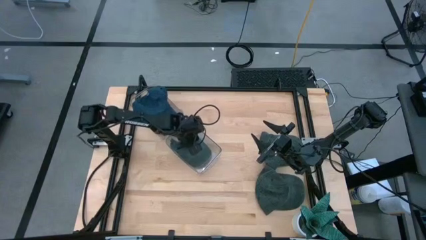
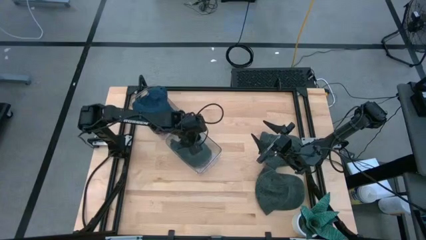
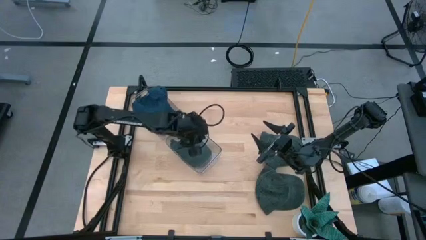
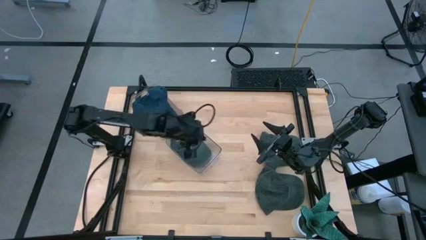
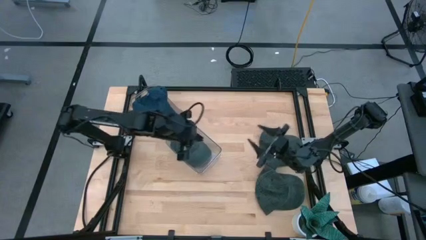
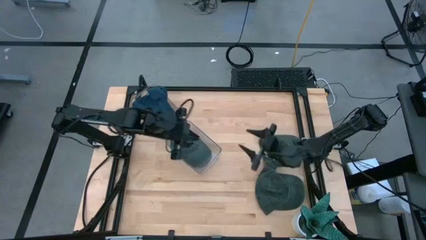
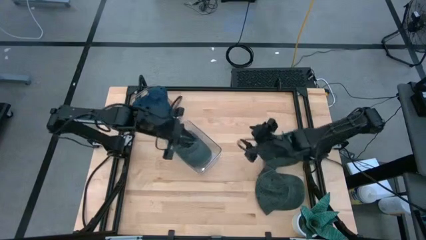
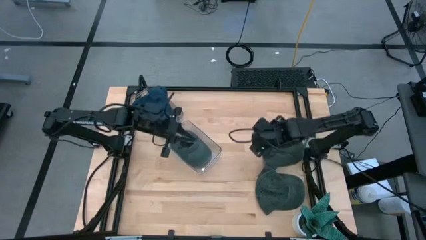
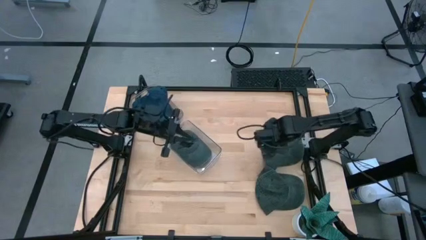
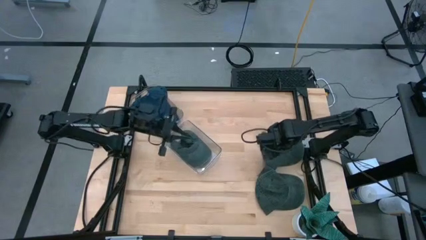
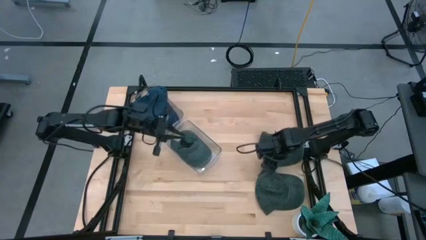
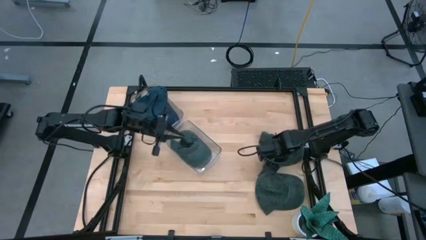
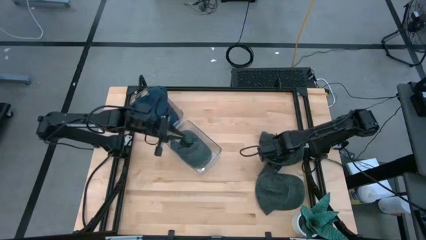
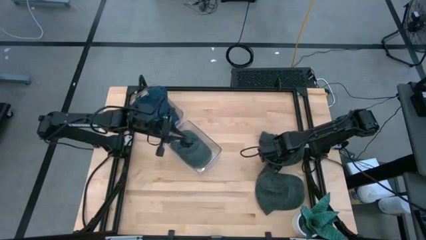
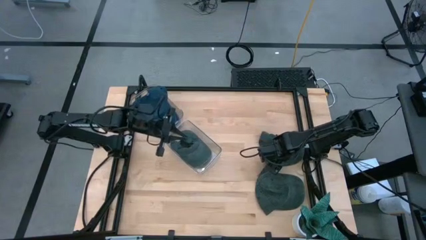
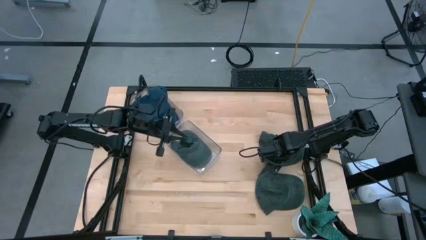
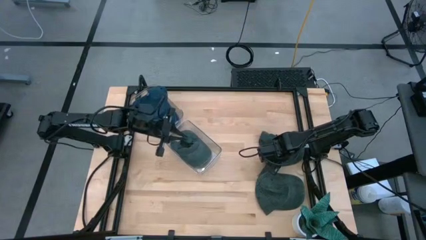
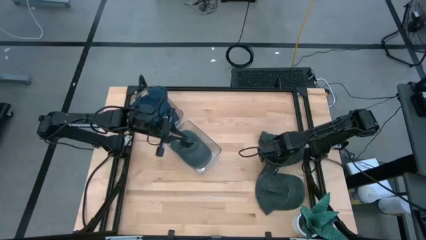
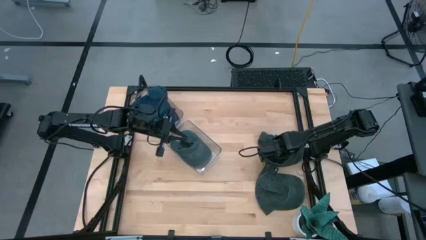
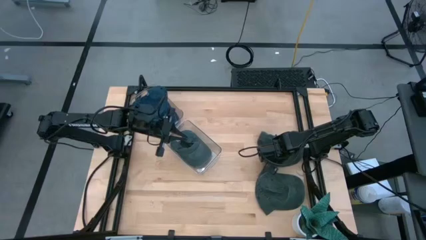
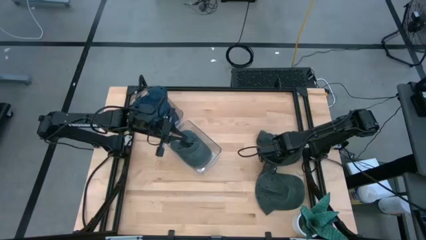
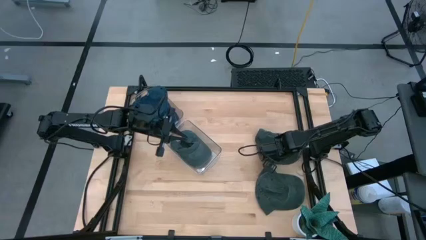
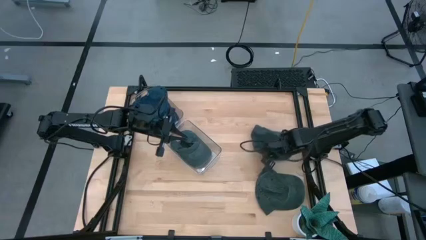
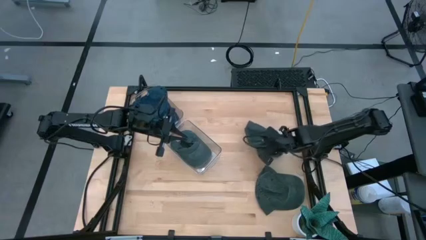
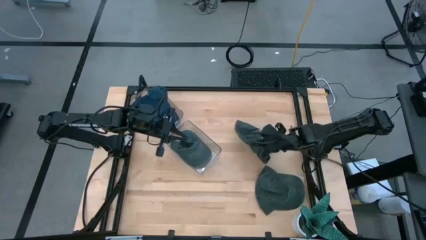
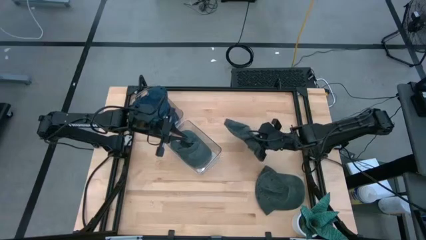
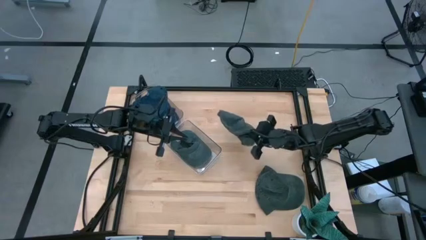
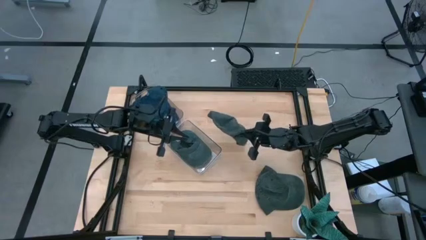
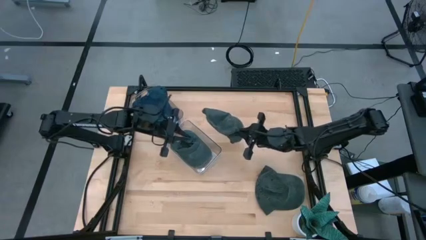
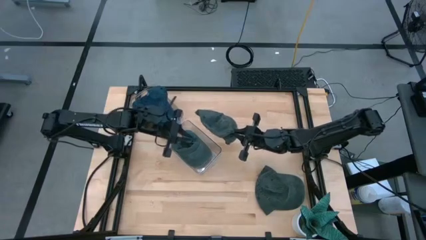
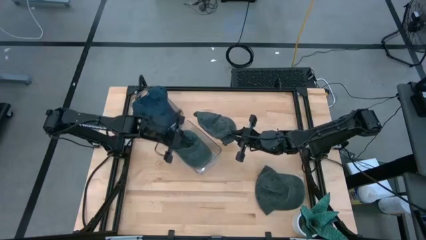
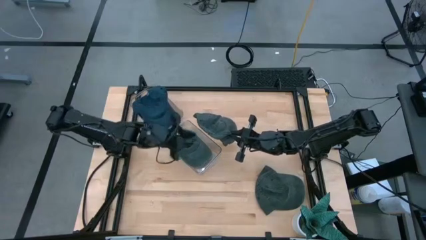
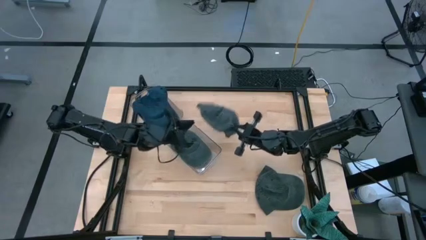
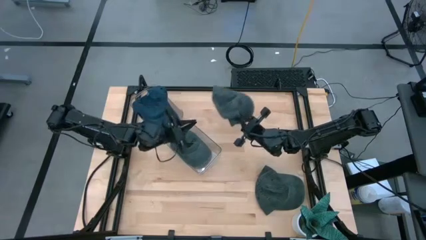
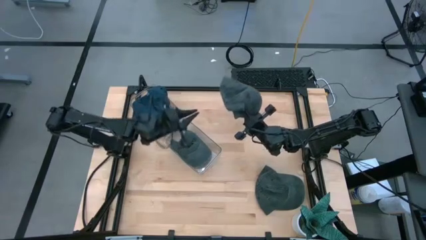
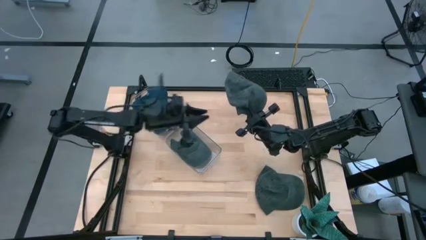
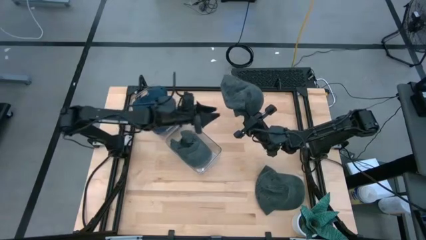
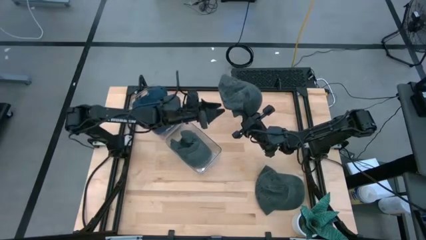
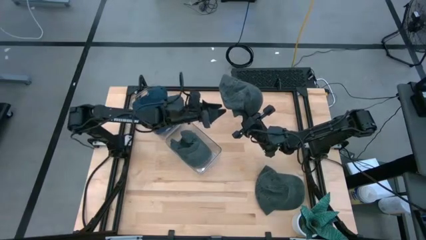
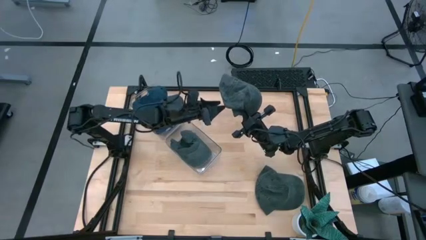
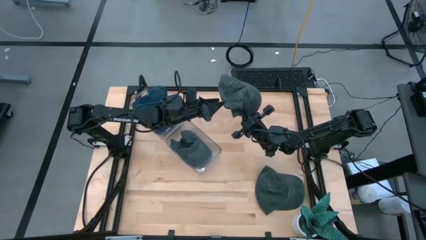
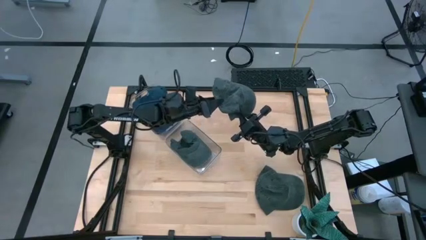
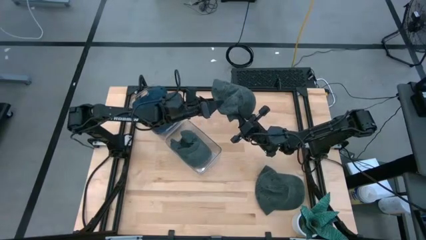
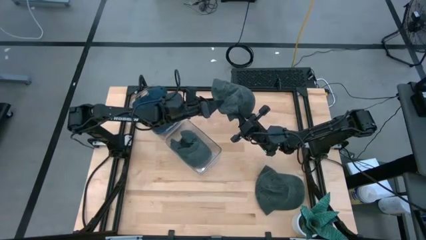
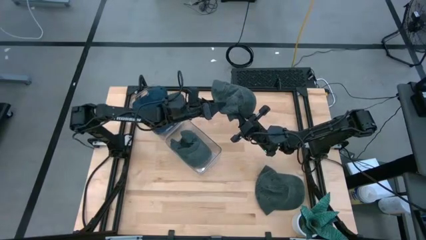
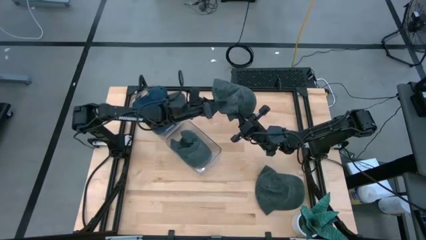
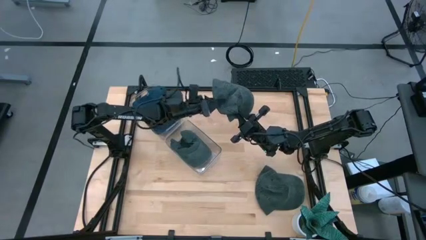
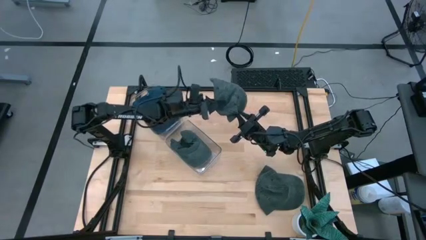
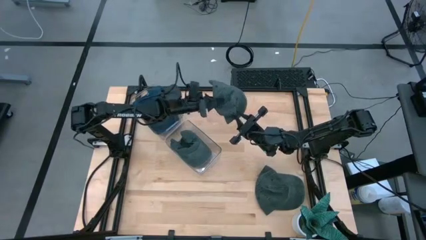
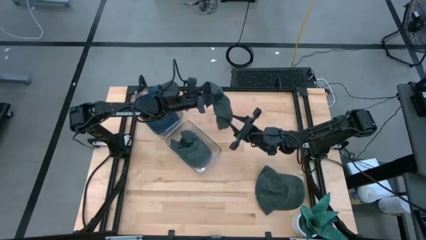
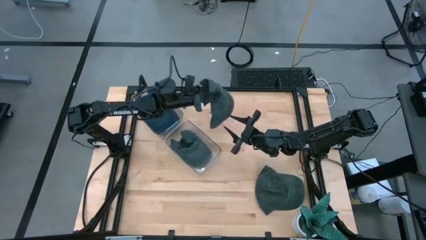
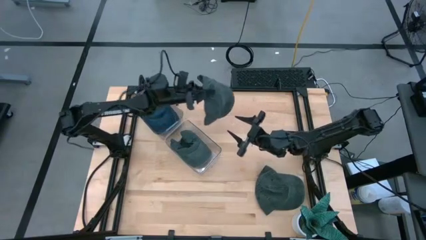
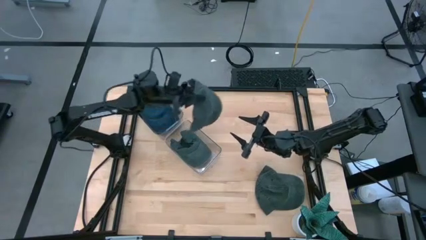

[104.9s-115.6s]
Task: Pick & Place hat
Put the top black cap into the bottom transparent bin

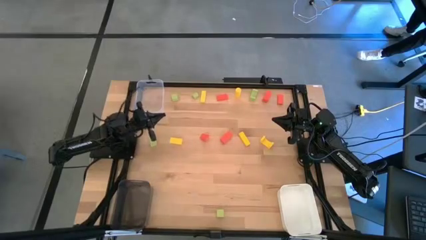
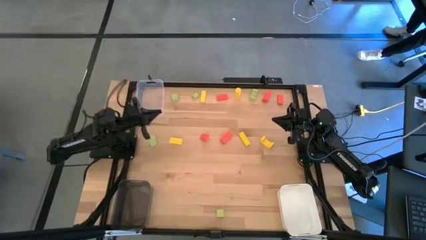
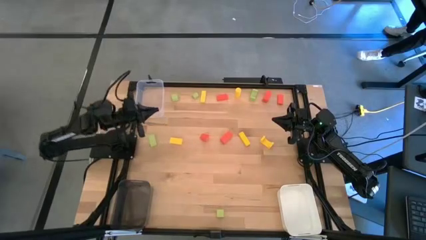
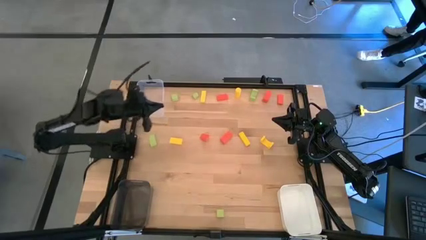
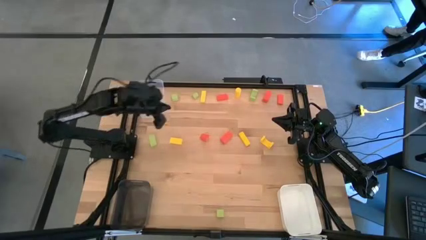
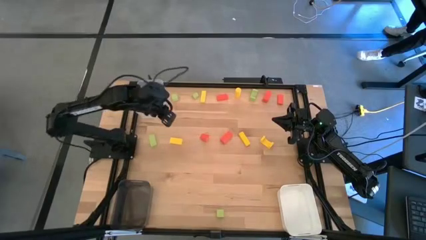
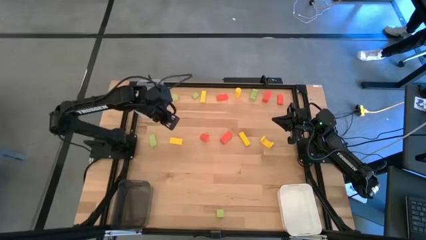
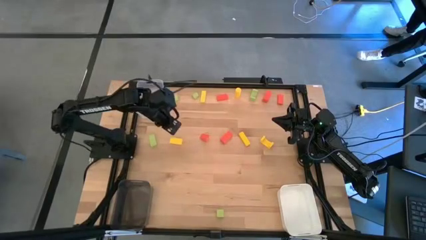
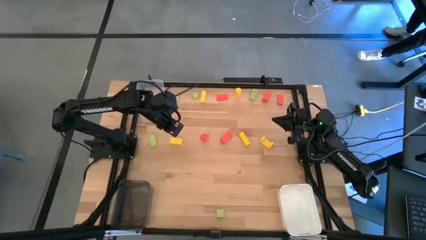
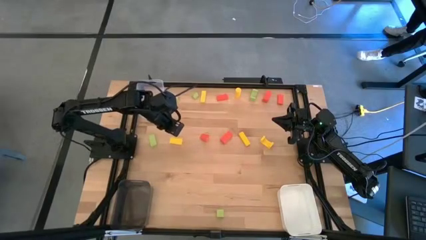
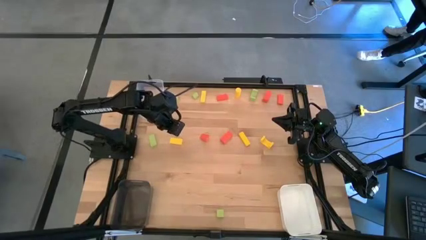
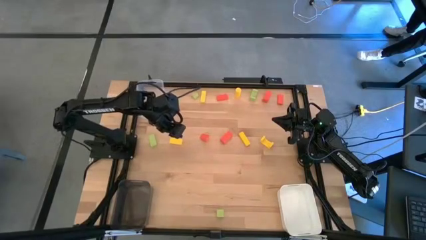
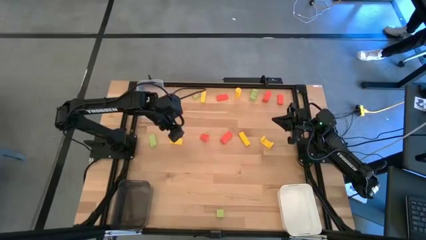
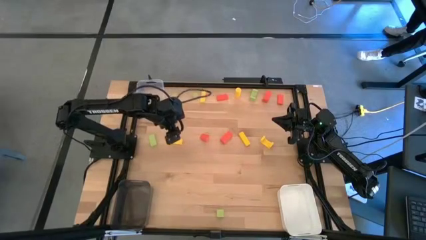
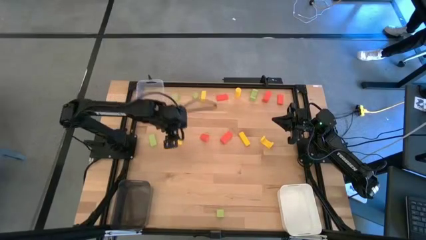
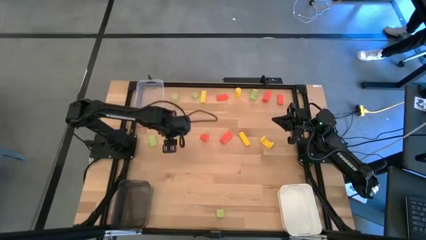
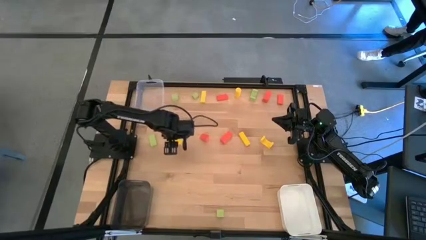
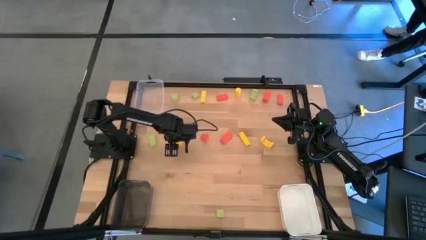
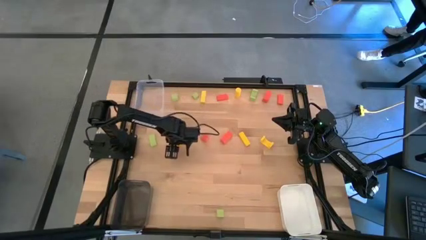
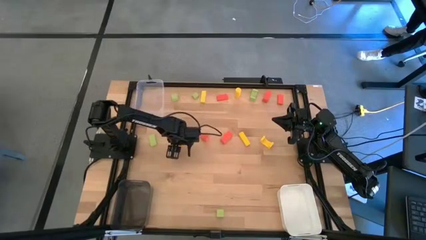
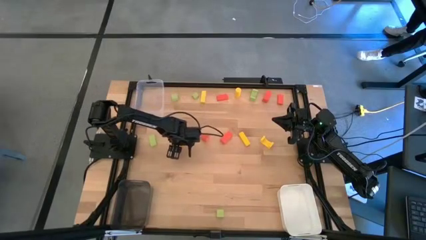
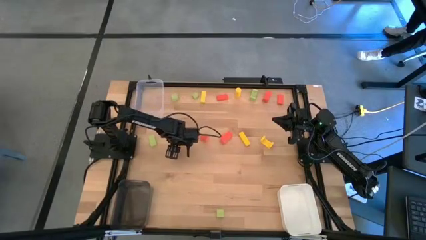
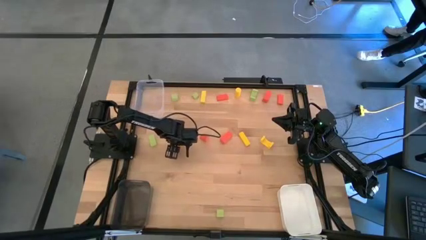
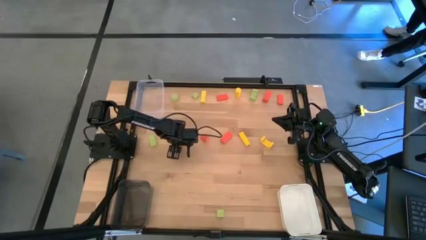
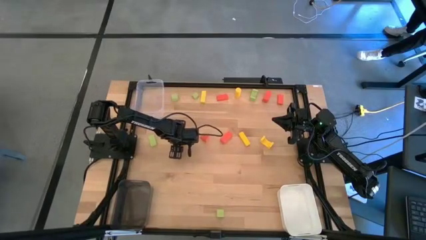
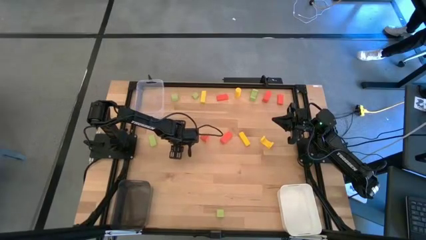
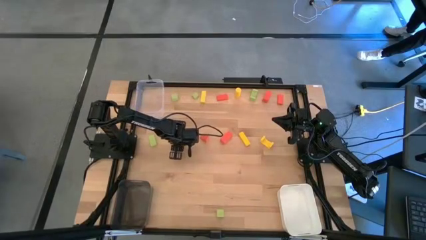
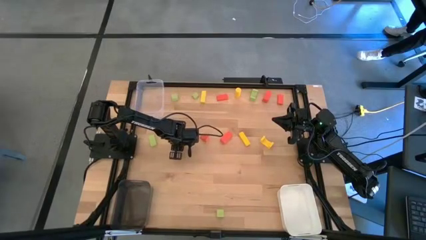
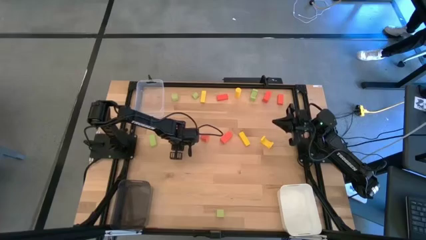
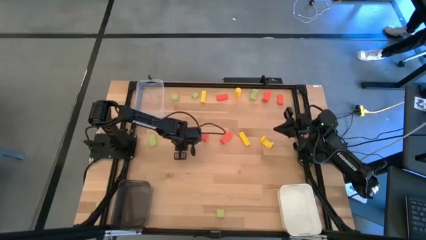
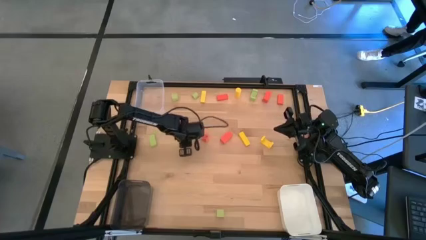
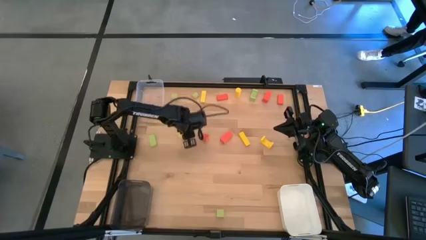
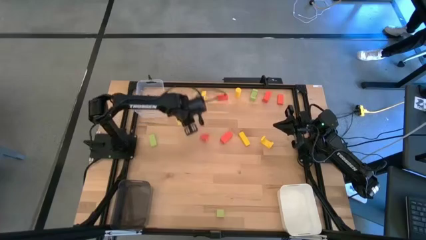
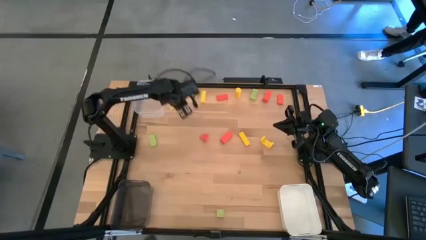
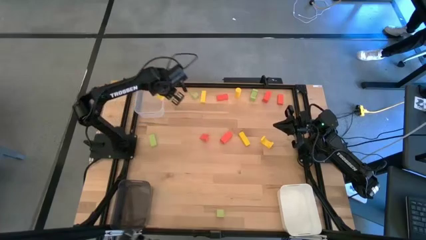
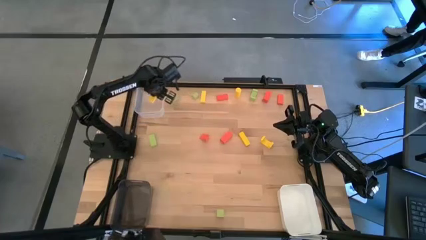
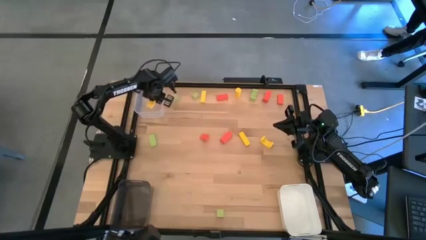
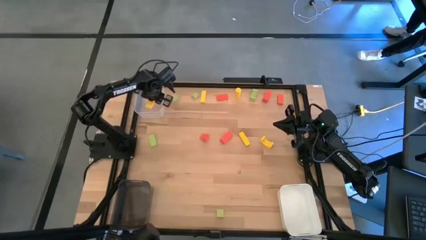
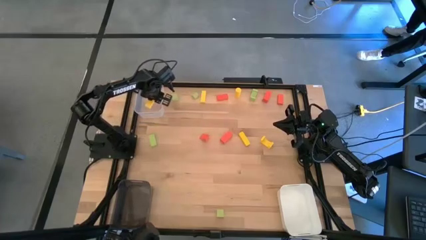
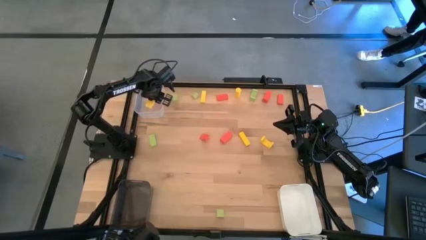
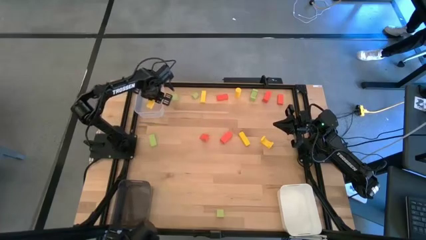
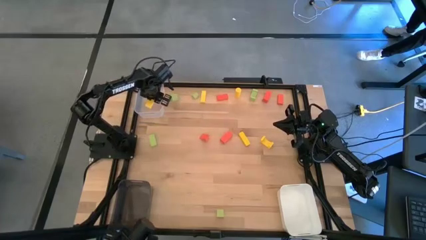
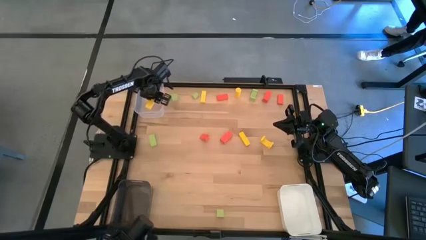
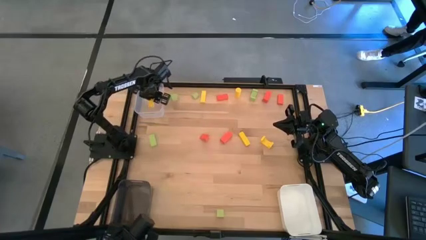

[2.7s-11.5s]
Task: Sort & place blocks by color
Put the yellow block into the transparent bin
